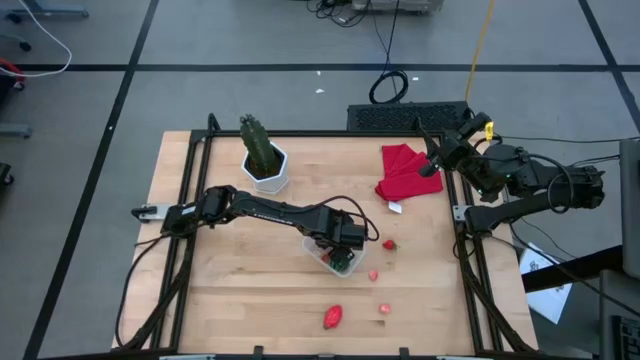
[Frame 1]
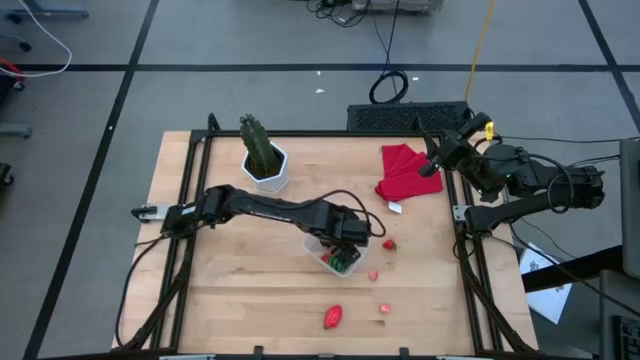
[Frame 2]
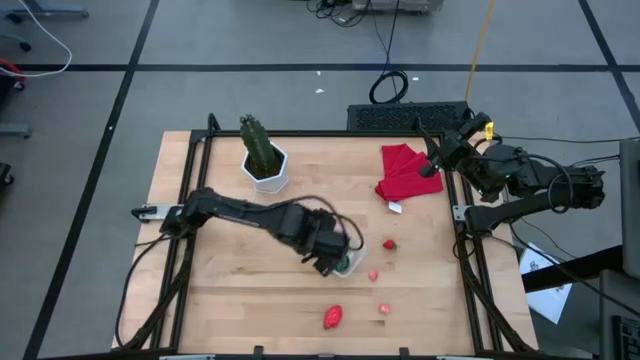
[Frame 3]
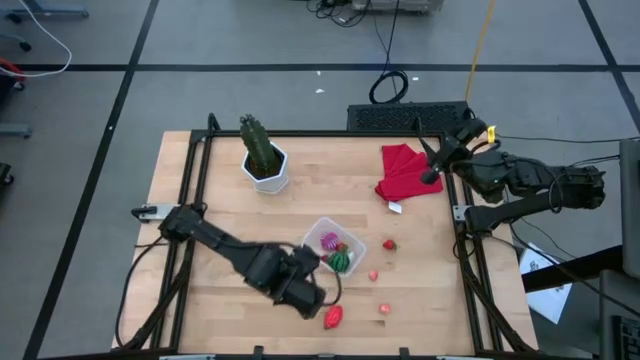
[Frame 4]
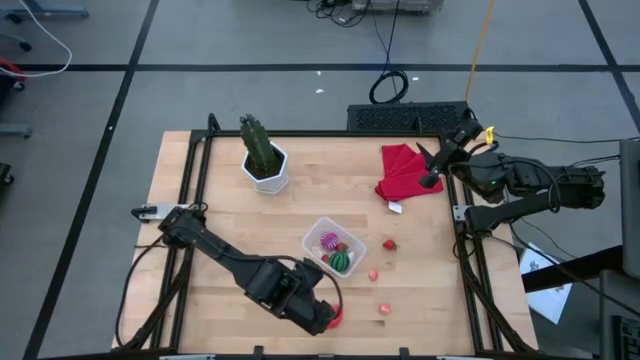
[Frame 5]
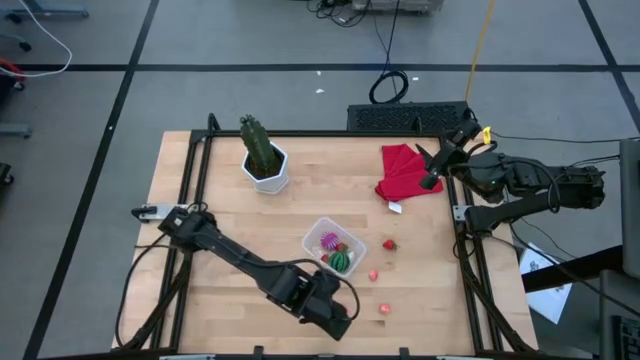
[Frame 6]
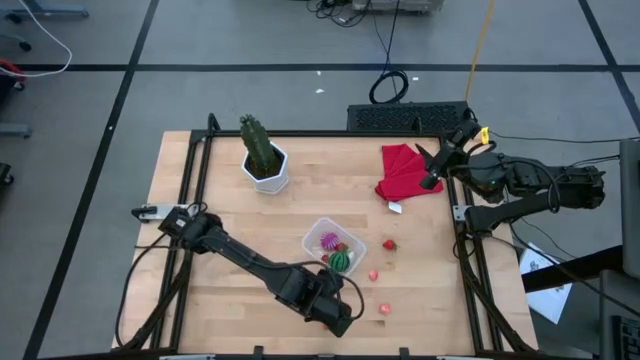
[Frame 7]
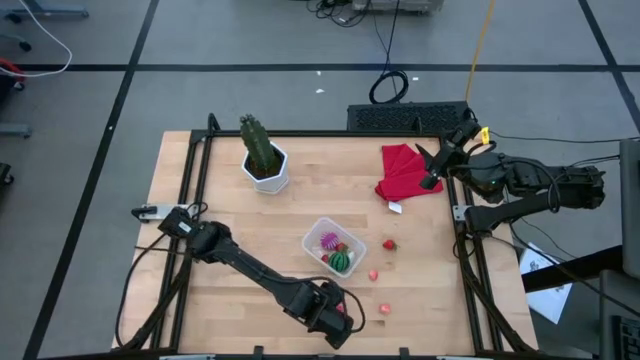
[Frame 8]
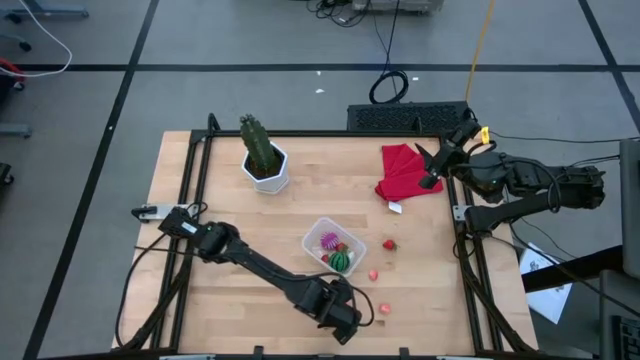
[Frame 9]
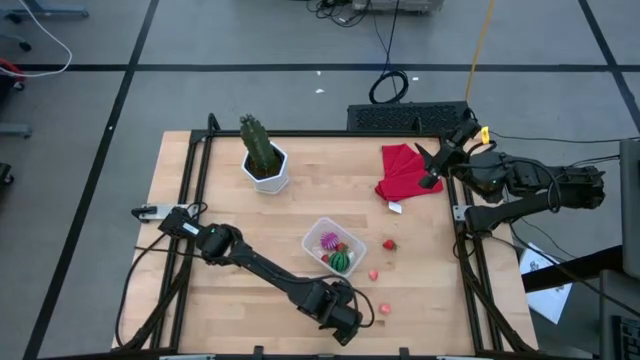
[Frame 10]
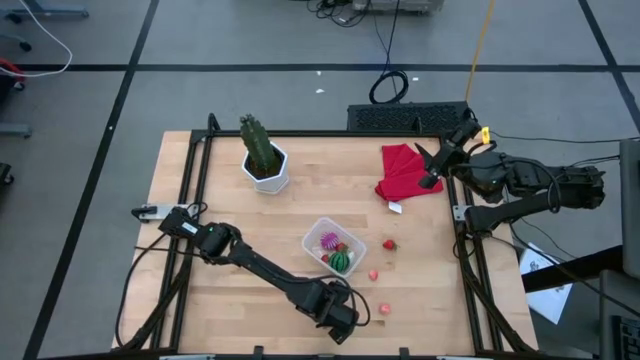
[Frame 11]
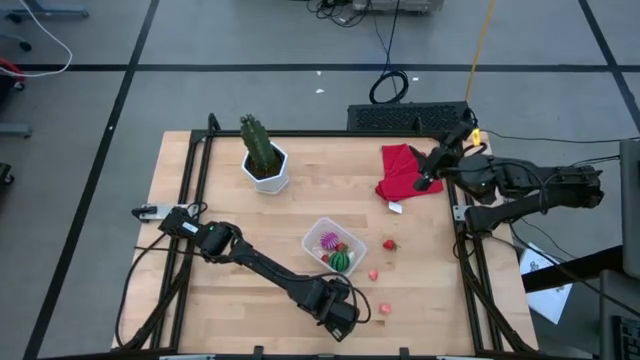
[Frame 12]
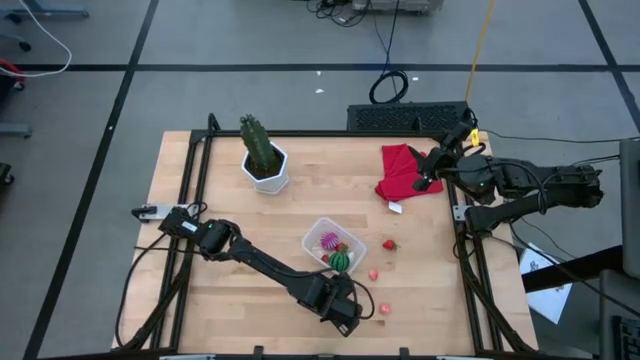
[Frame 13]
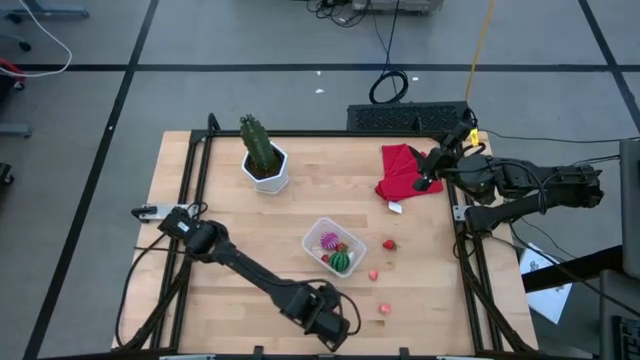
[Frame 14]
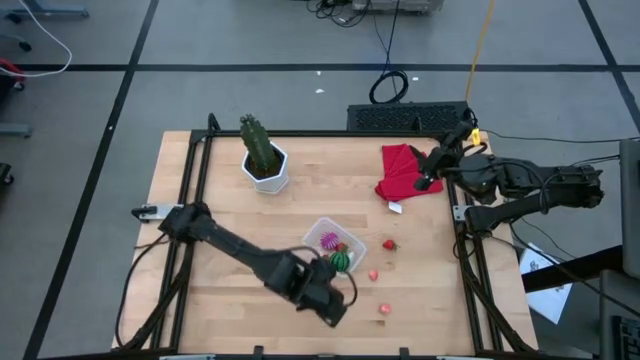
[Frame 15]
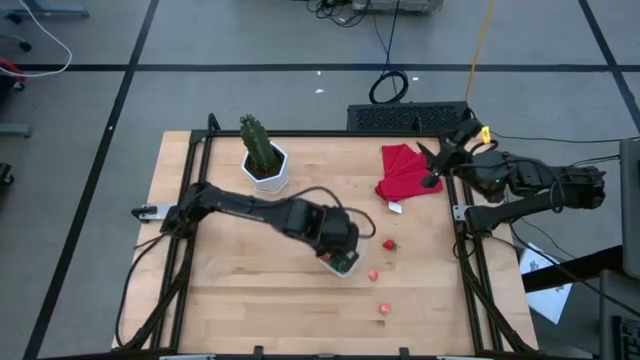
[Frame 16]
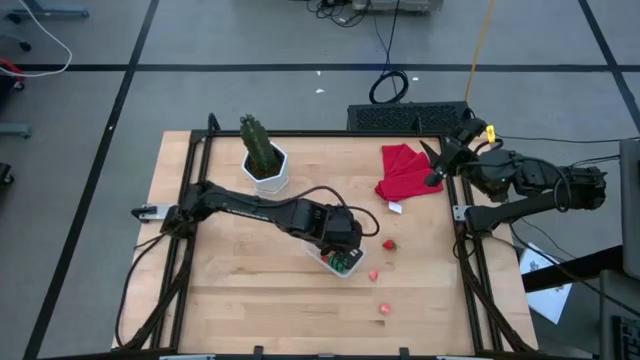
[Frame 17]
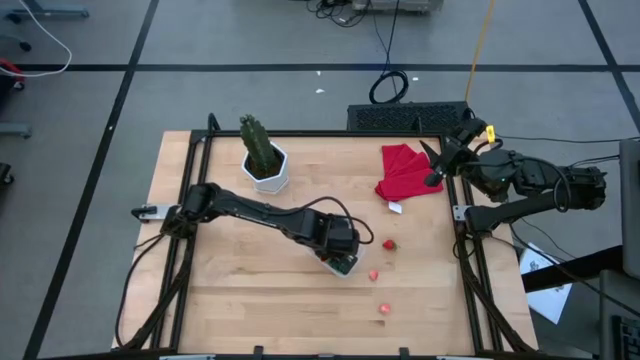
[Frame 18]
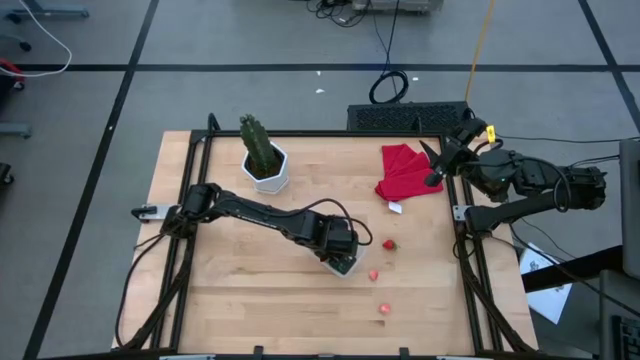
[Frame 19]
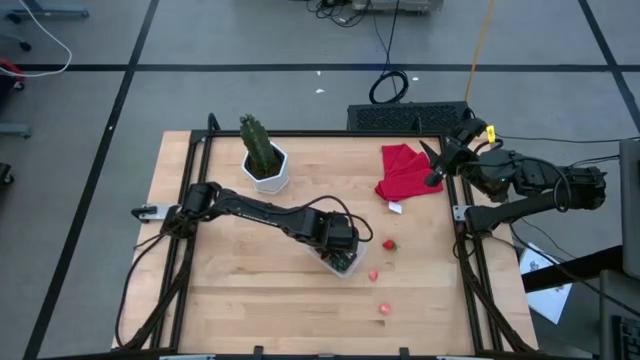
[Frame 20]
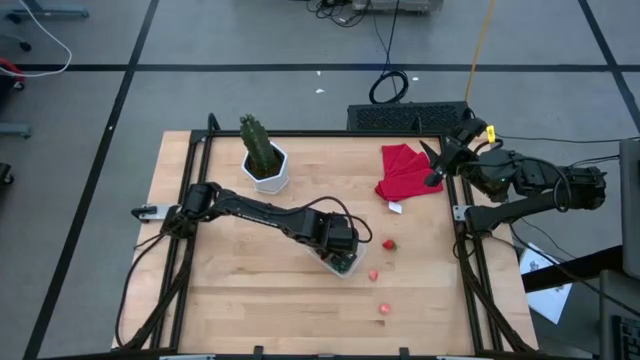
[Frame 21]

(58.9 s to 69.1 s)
Task: Pick and placing Produce into tupperware
Put the dragonfruit into the transparent bin

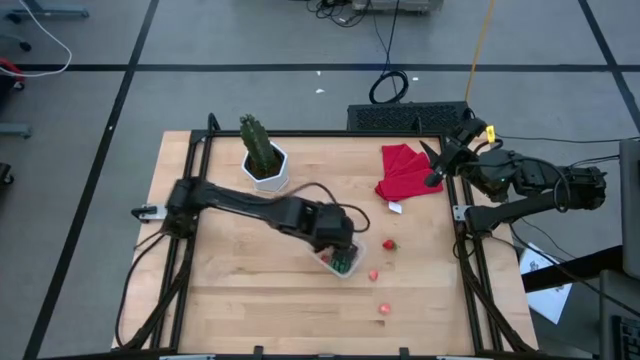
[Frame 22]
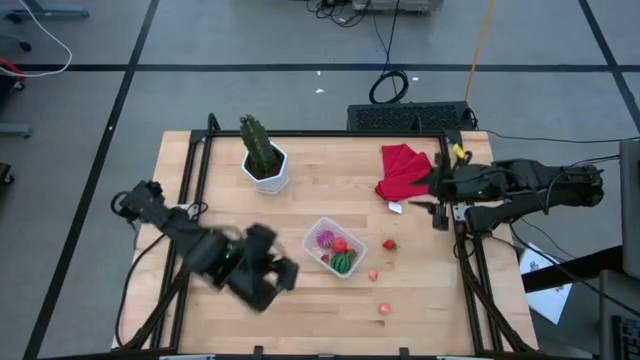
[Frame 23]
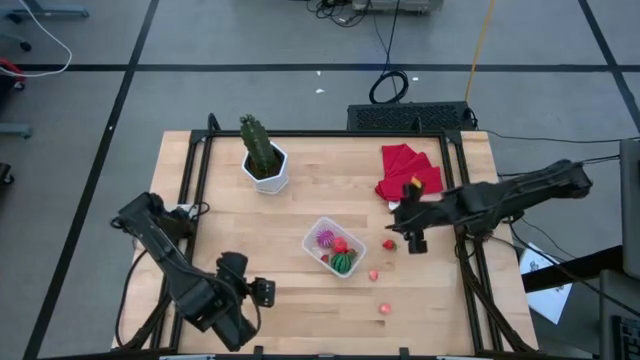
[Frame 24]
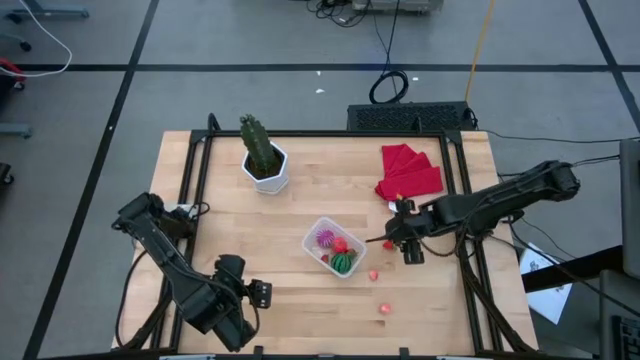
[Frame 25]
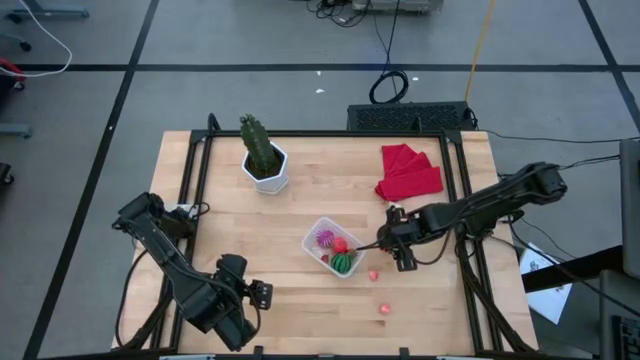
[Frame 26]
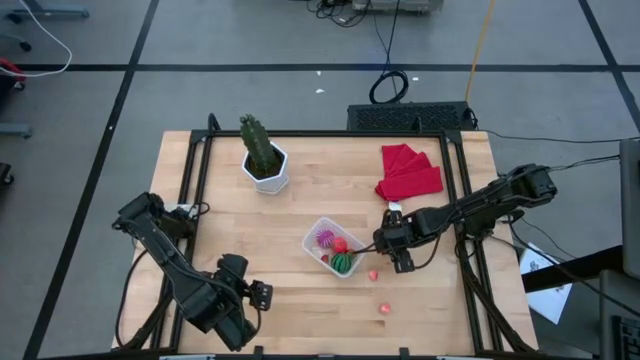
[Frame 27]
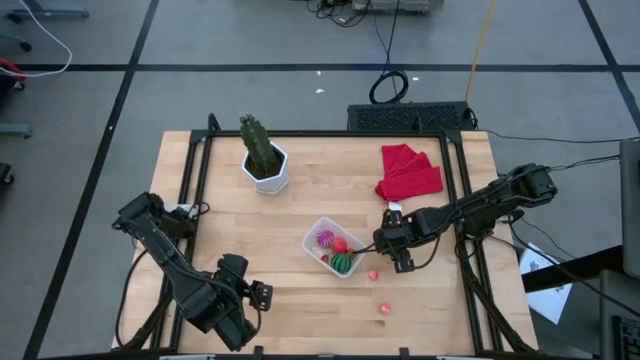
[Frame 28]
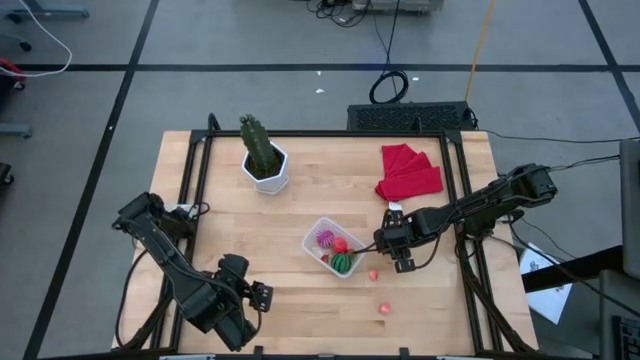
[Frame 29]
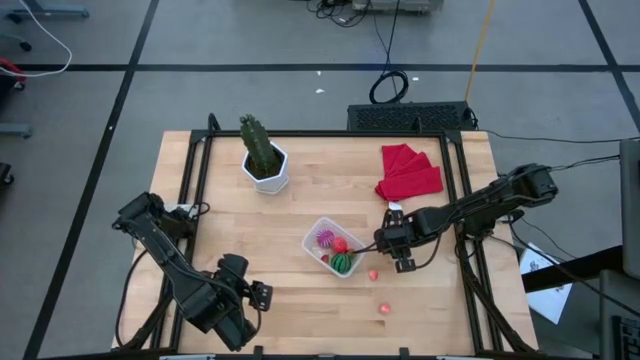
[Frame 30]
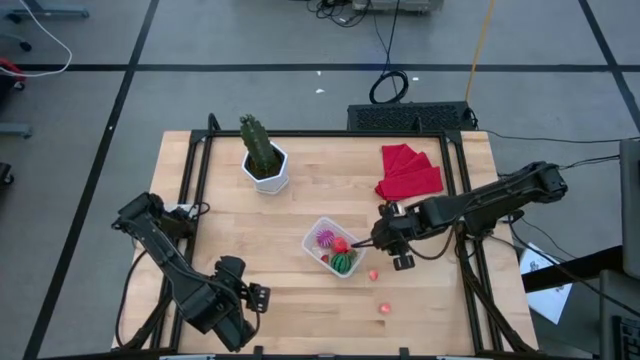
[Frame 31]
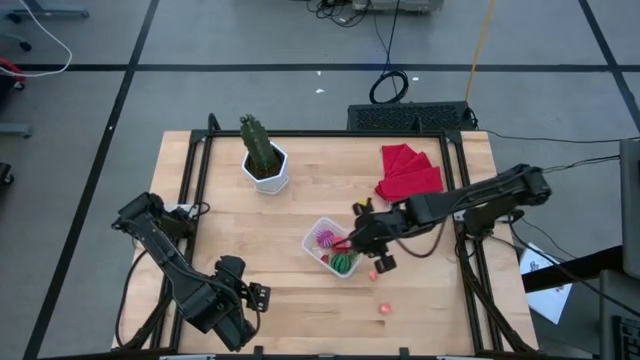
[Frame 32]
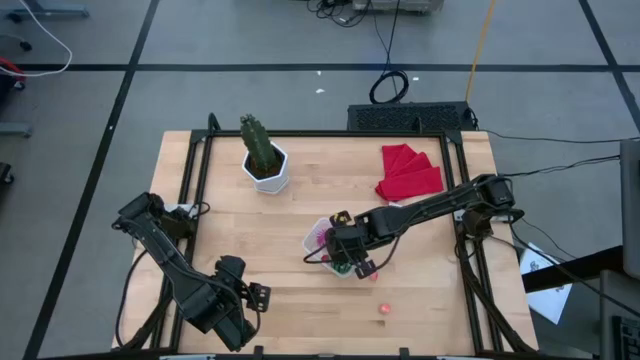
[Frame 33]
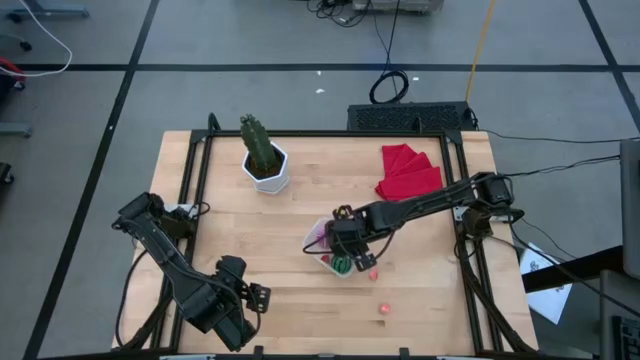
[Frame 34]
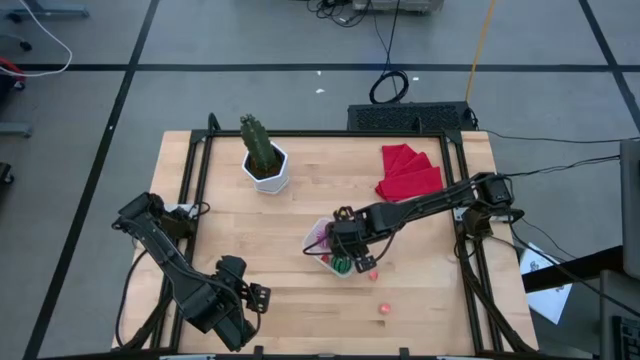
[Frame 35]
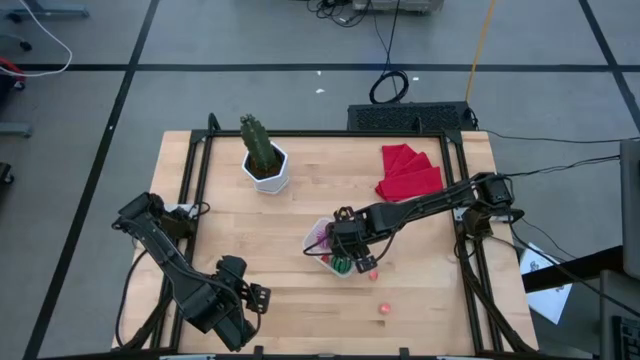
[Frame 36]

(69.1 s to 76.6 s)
Put the strawberry into the transparent bin

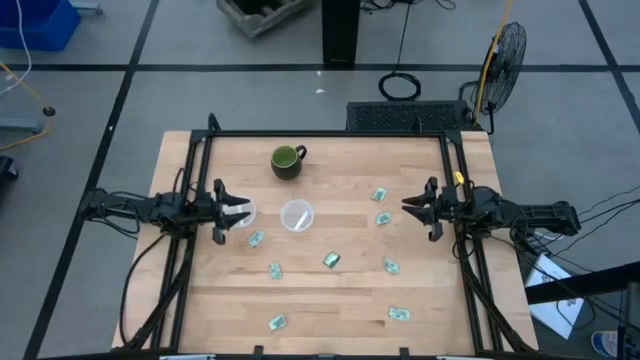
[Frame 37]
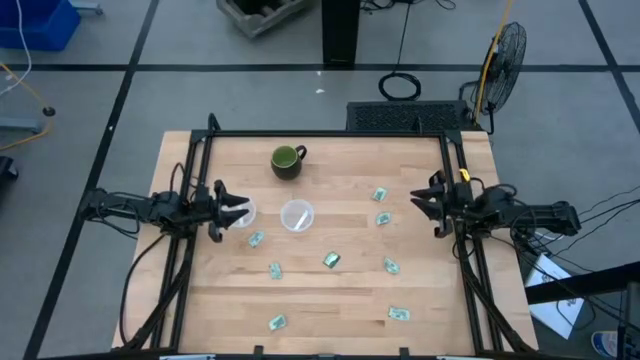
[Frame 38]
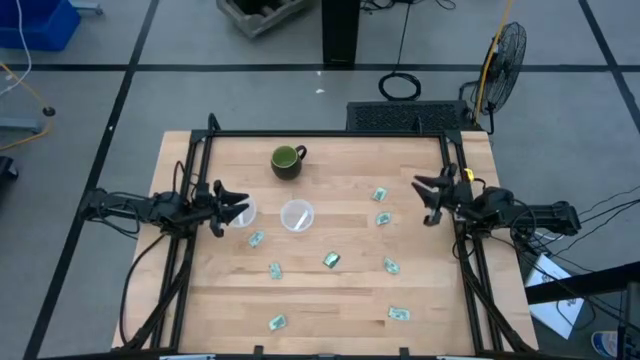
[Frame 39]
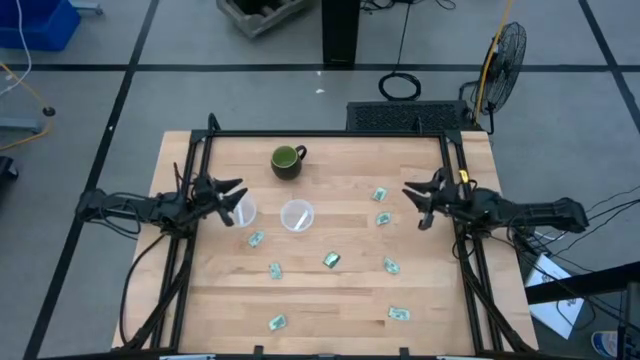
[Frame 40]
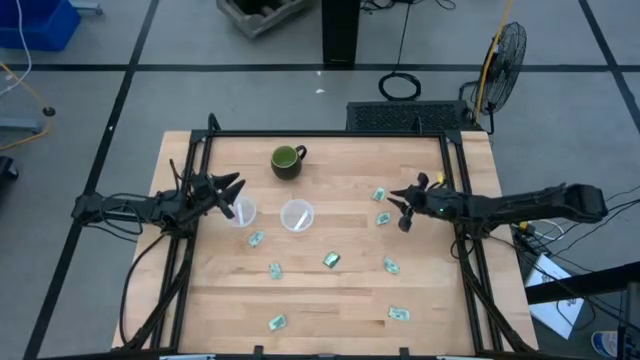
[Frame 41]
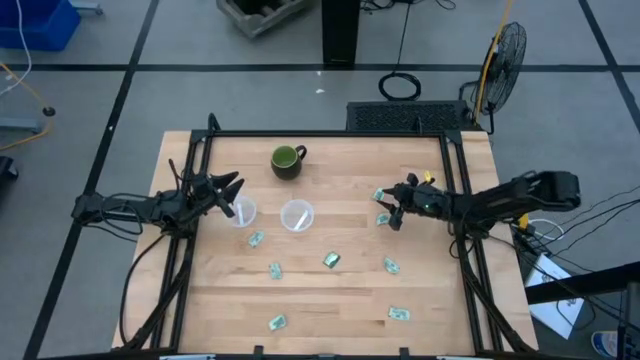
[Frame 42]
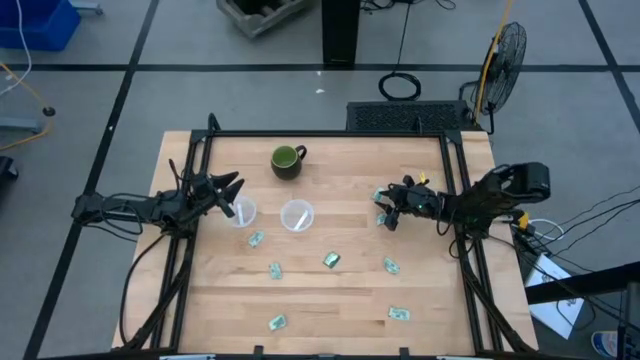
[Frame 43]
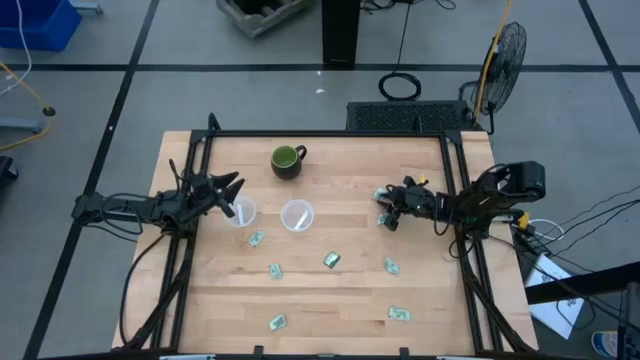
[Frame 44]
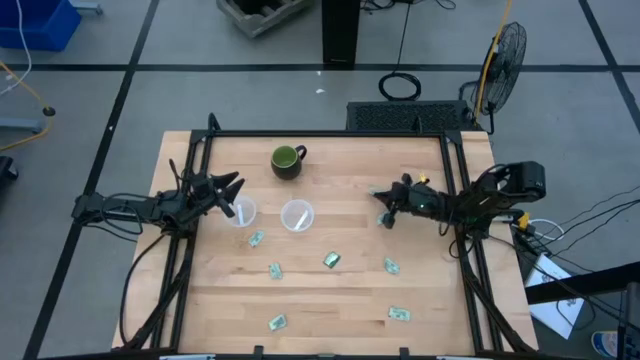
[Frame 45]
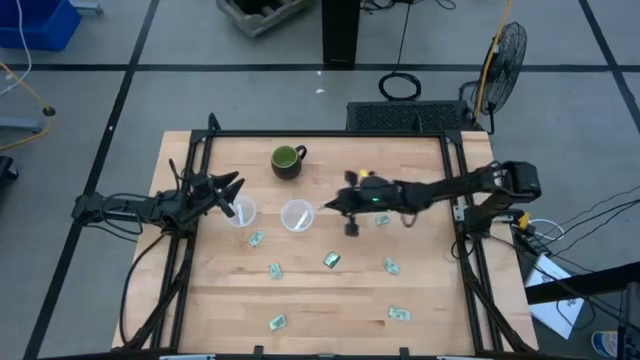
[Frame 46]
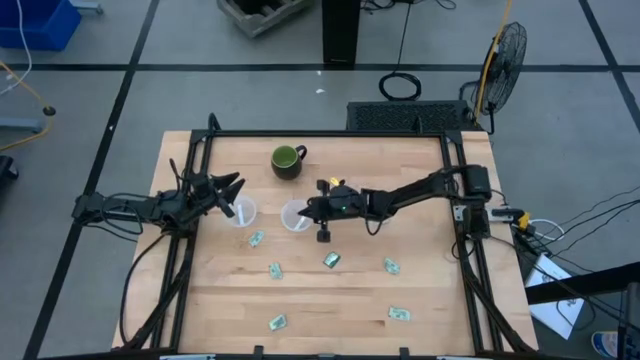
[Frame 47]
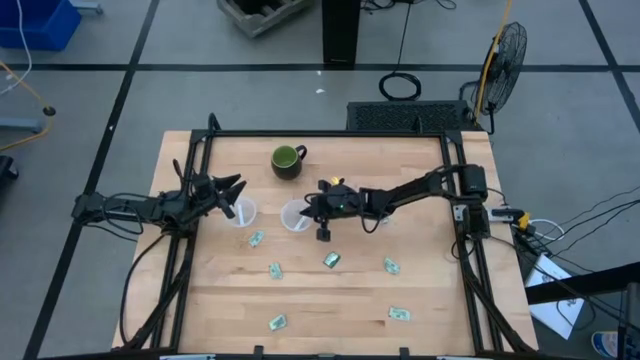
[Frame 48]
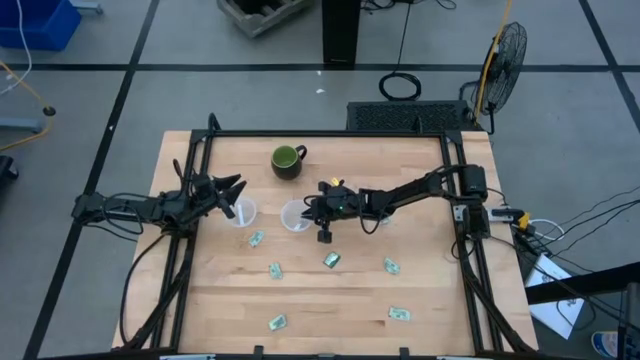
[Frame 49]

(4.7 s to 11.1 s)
Task: Pick and place Stevia / Truvia into bins
Put the stevia pocket into the right plastic container
